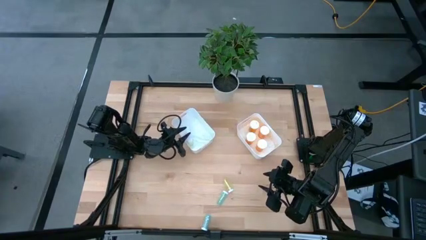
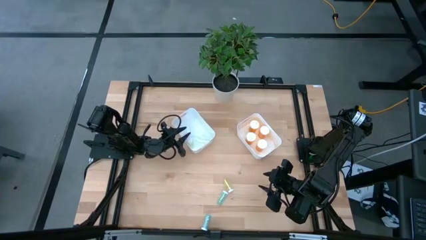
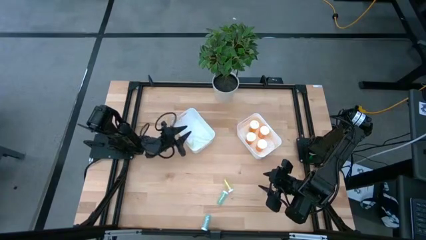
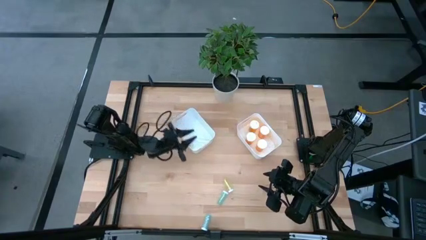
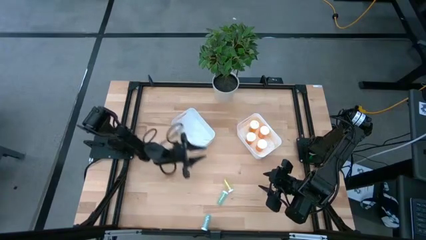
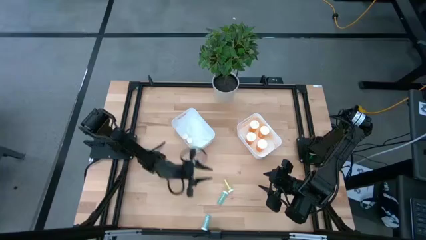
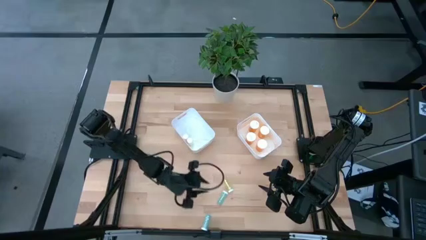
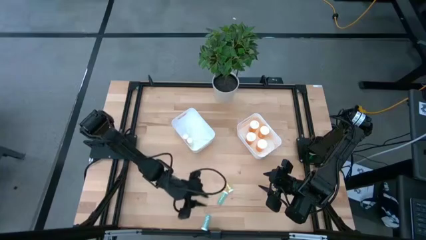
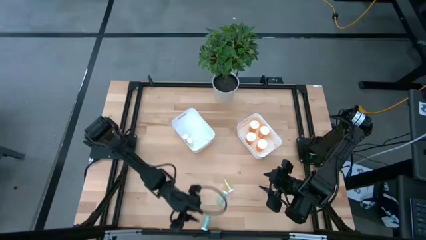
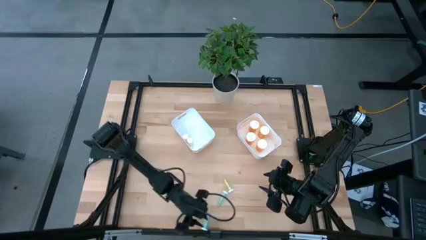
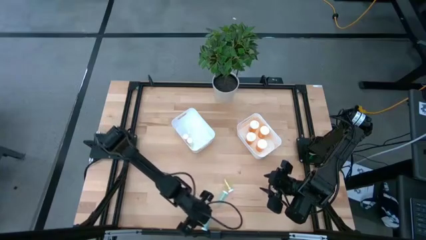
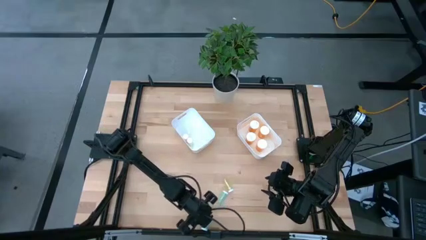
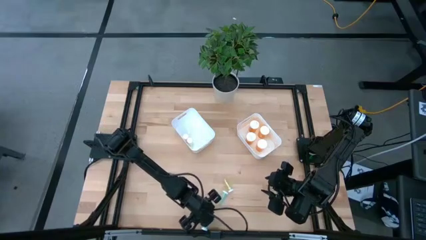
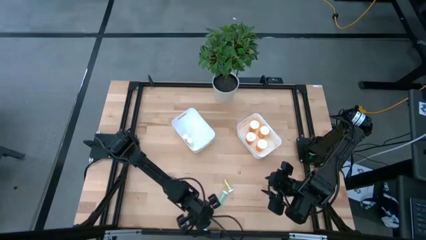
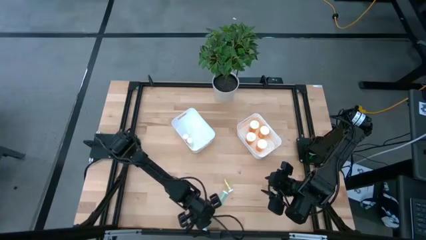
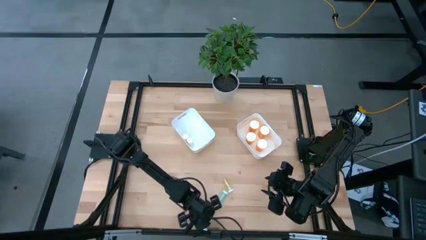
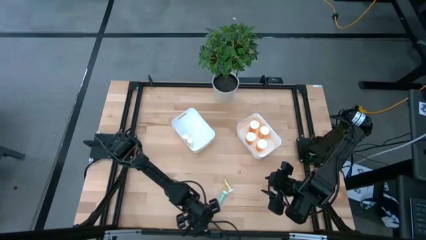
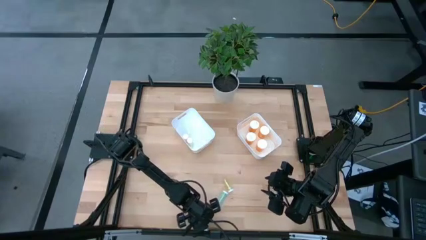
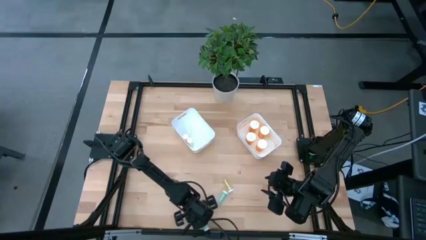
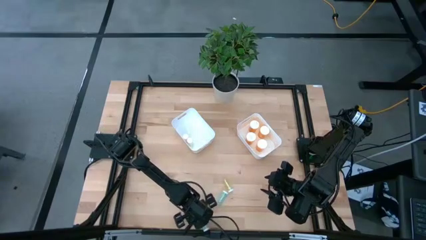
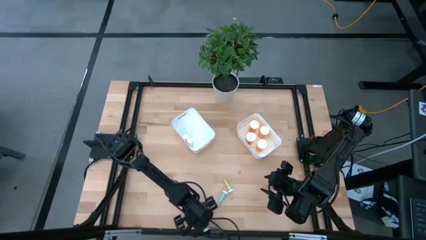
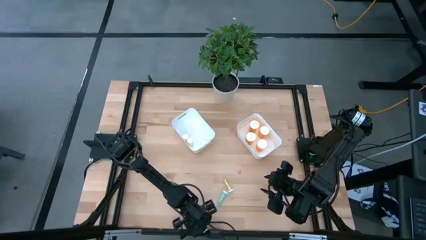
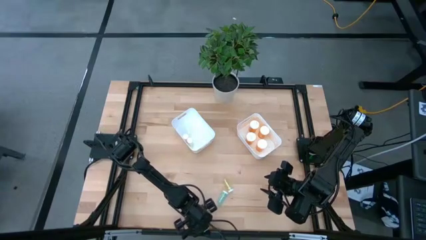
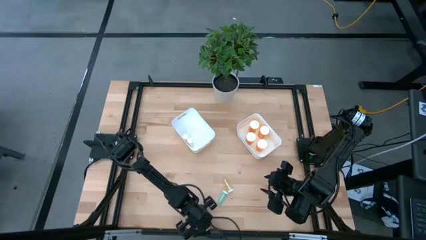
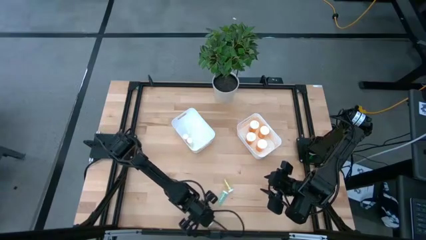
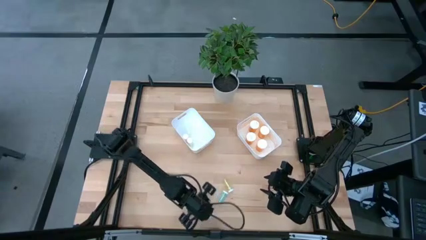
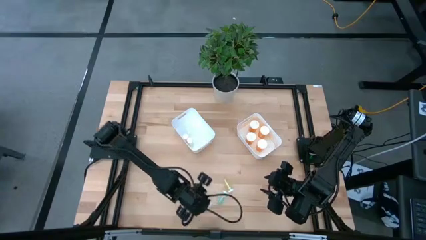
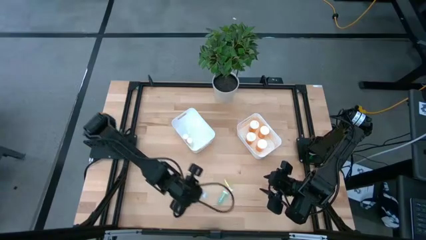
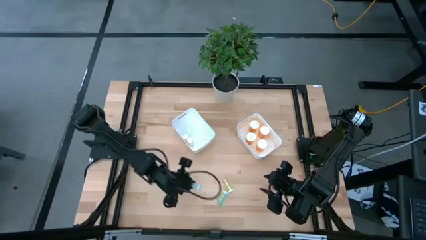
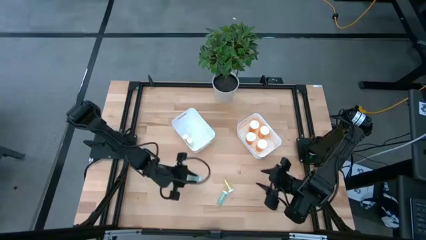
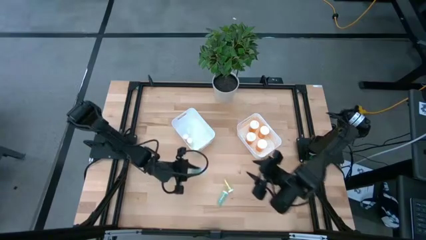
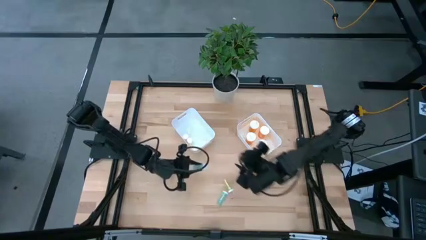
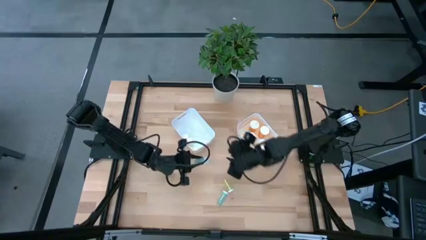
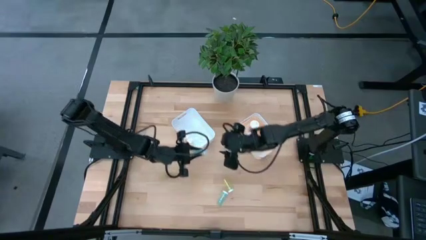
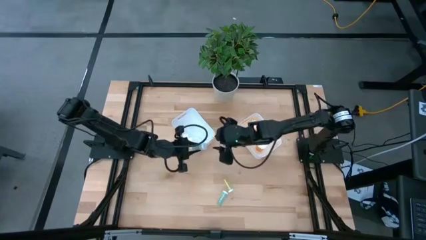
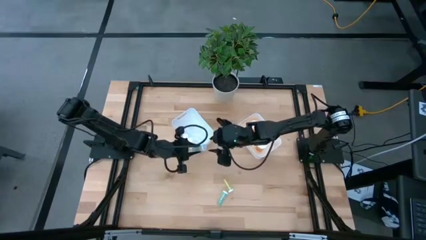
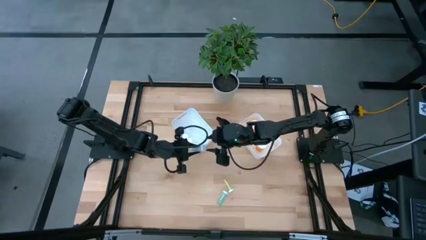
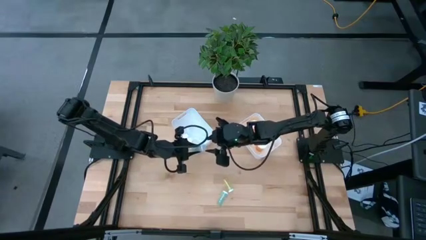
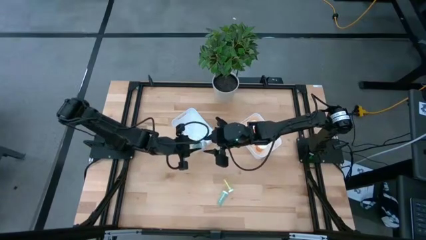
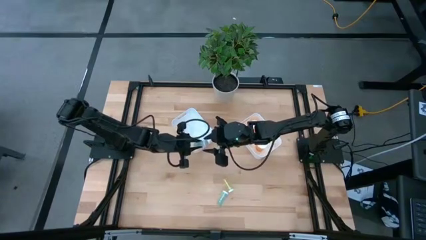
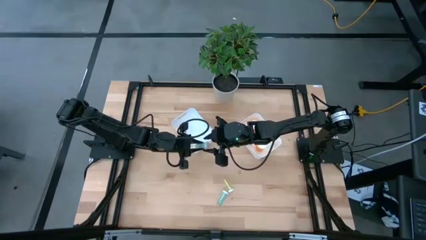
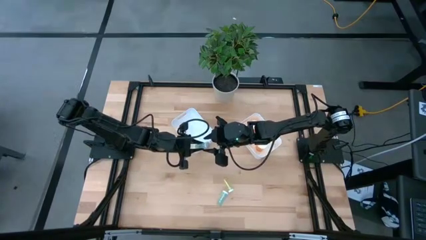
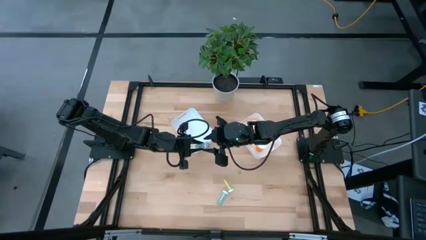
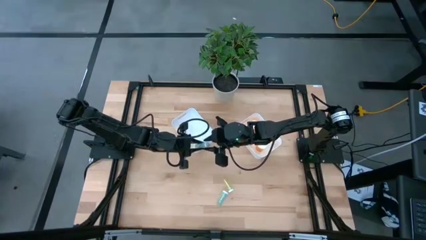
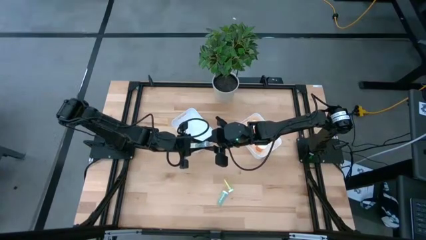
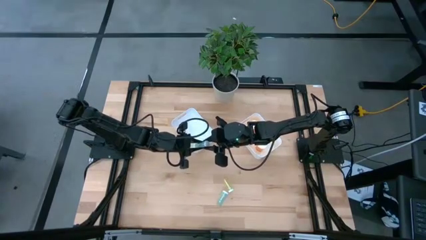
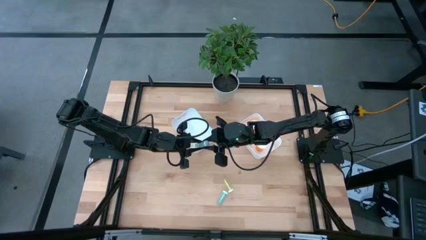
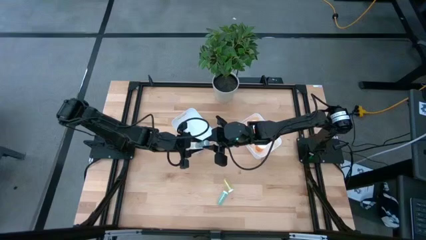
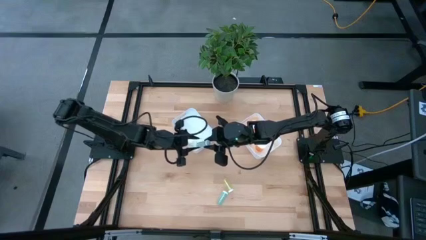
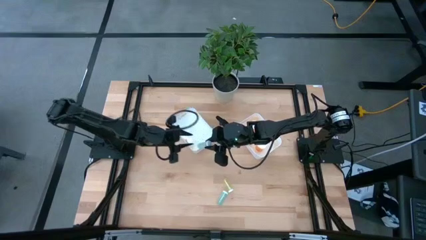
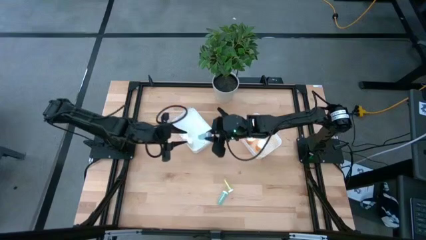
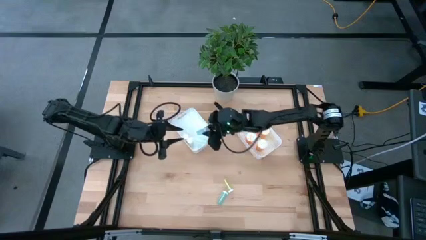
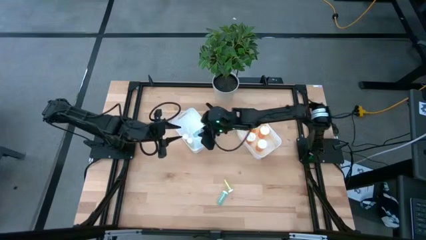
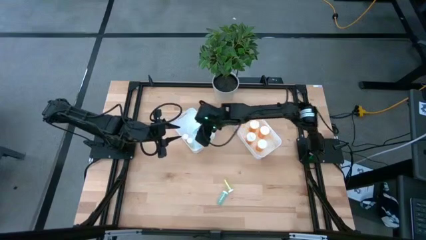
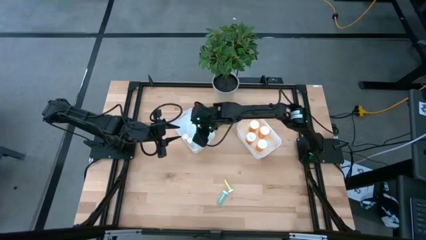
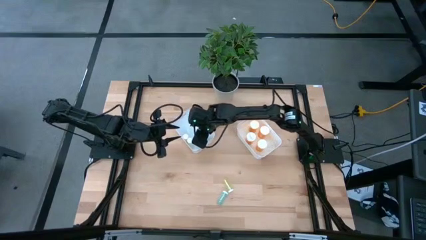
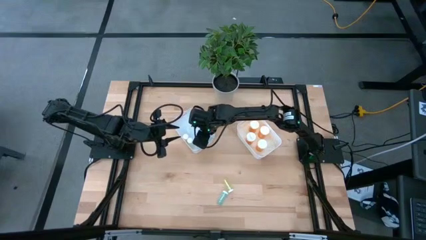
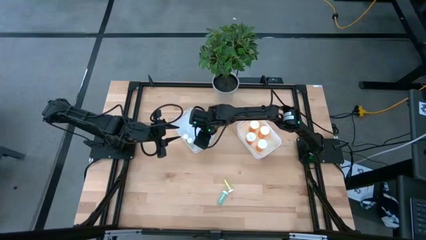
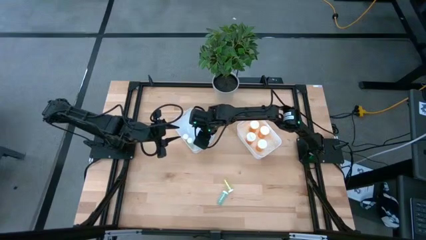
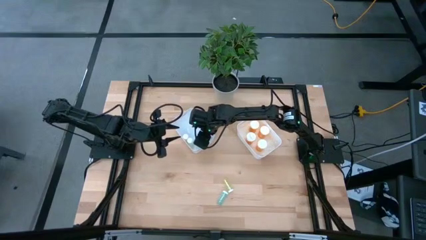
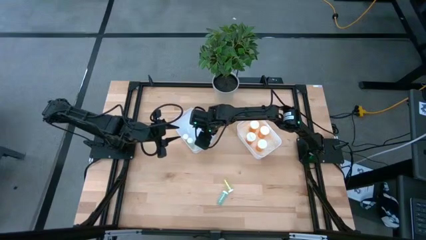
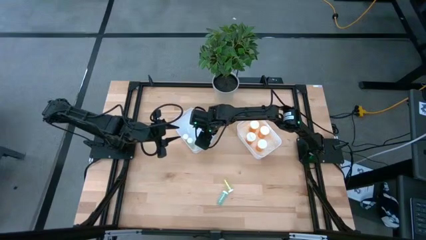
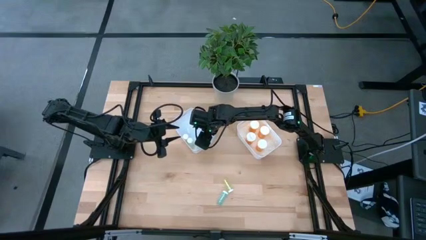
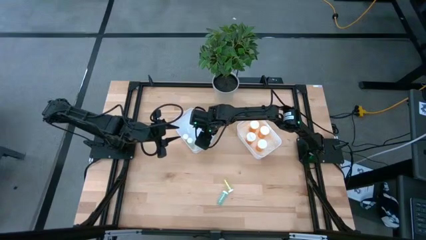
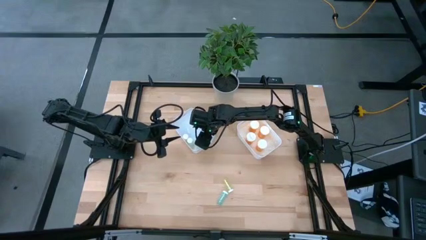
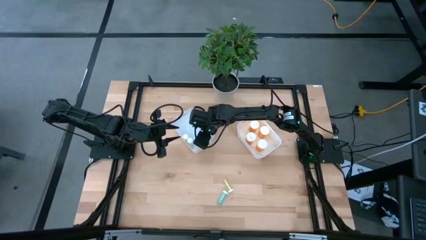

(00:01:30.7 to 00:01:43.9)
Task: Pick and place medicine bottles into bin by pill shape (circle, oval)
Put the bottom blue pill bottle into the left white bin

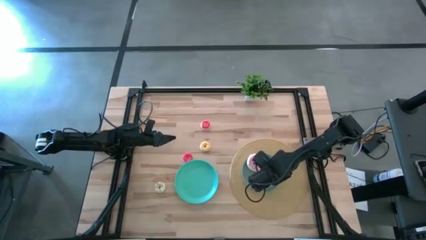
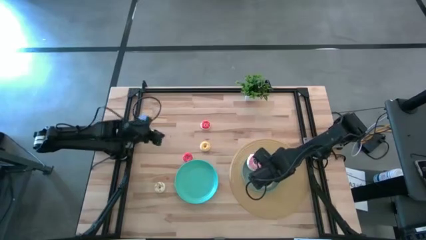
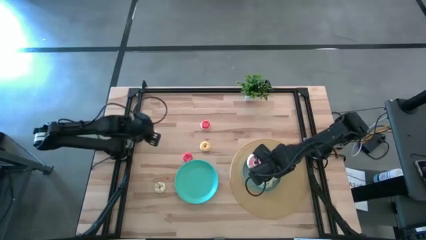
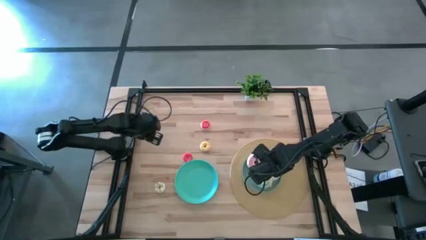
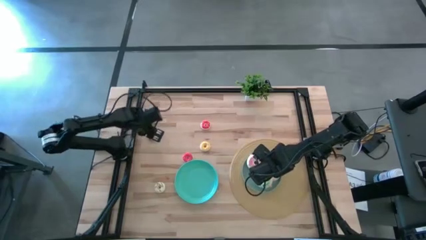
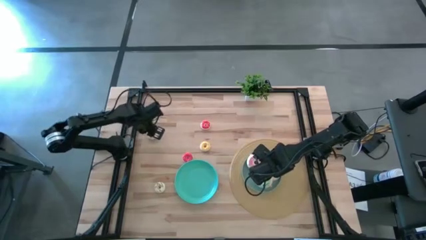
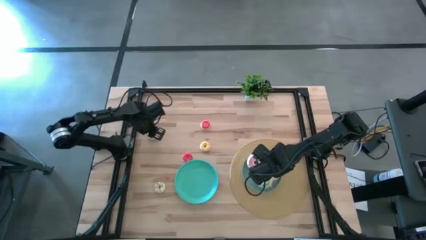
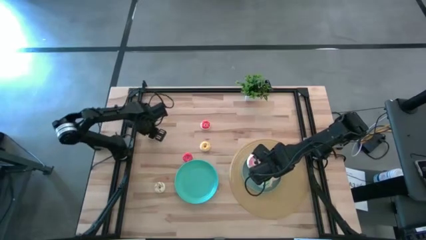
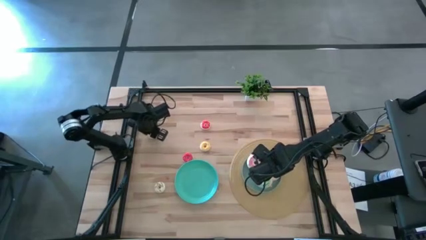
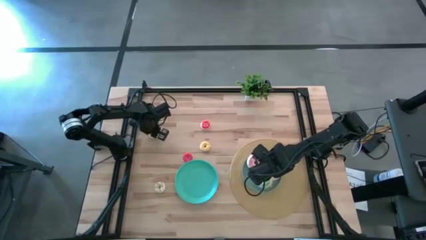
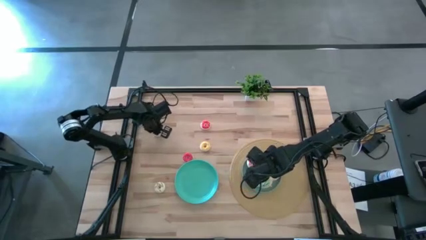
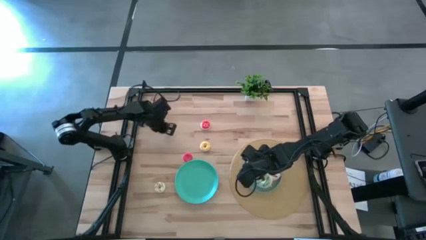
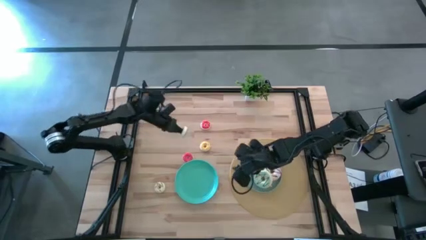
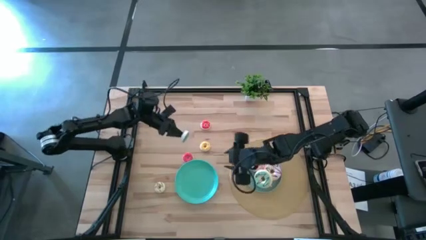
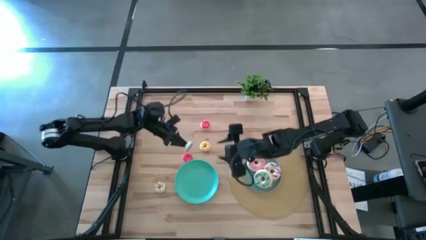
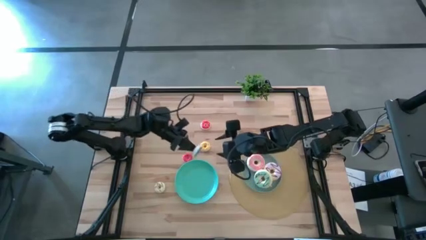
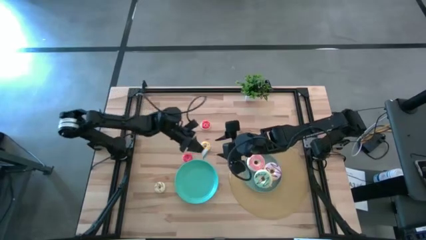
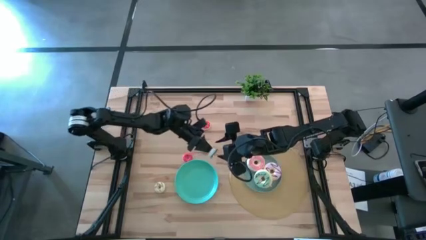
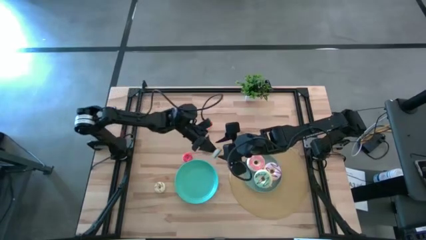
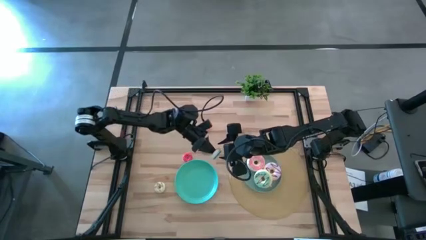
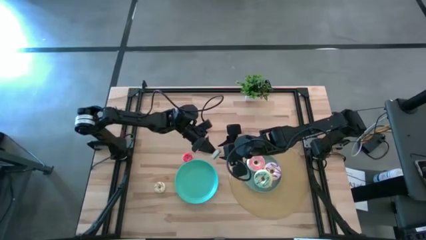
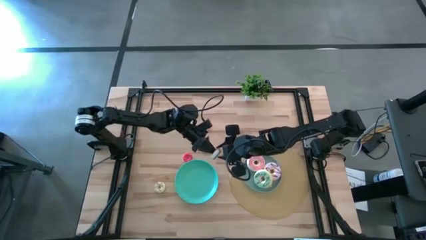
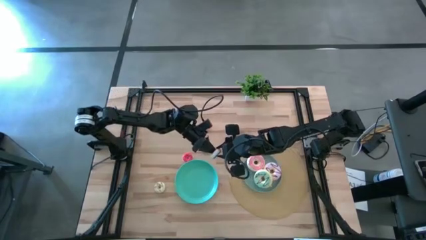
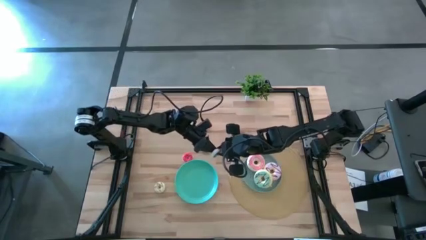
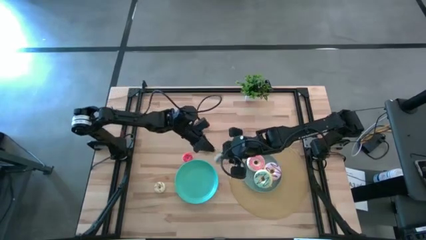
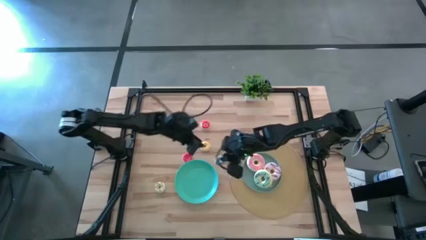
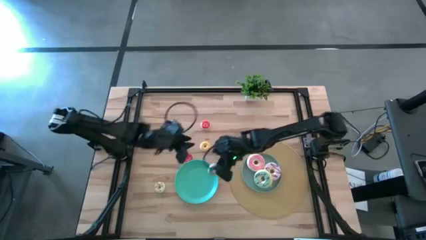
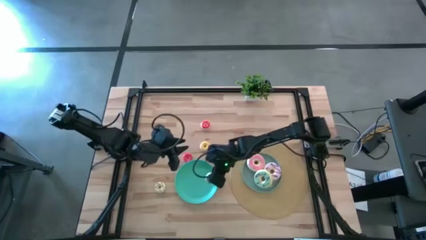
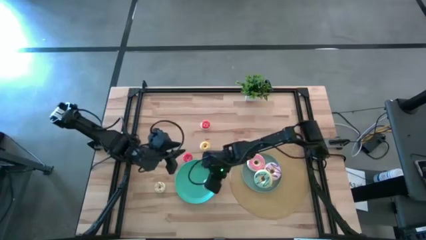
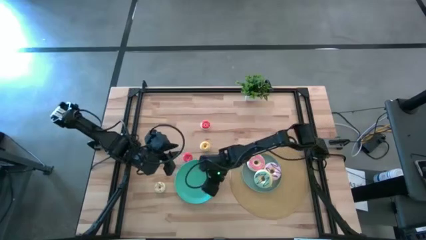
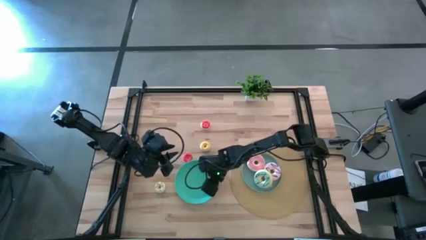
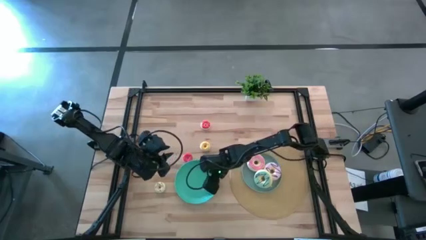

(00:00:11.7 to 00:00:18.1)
Task: Pick & Place donuts
Put the small blue donut on the green plate
